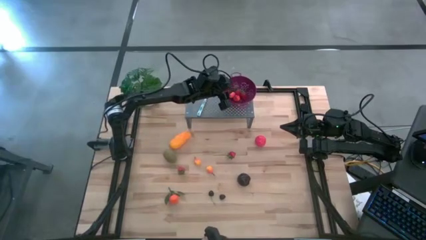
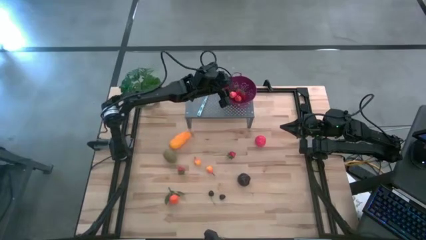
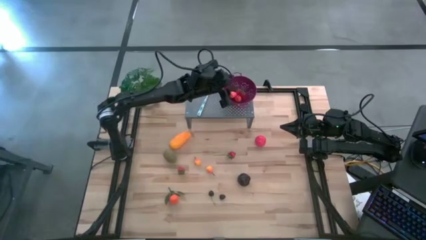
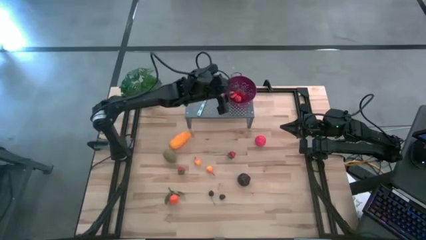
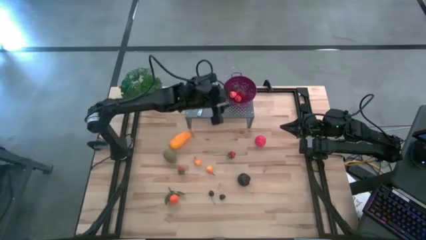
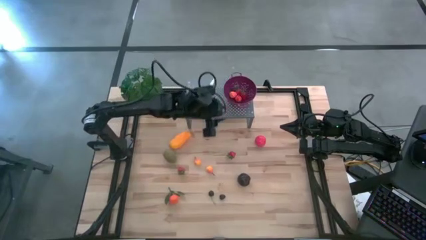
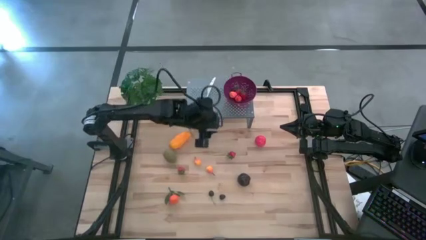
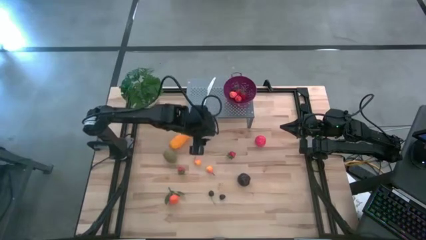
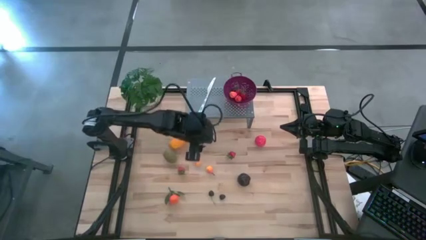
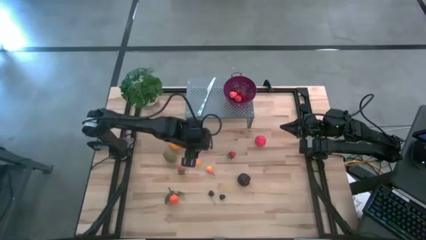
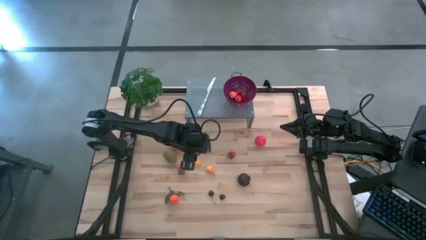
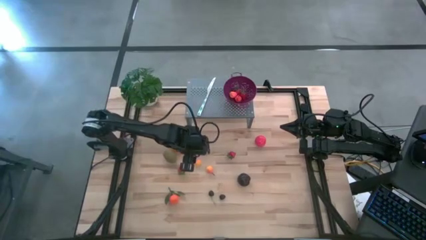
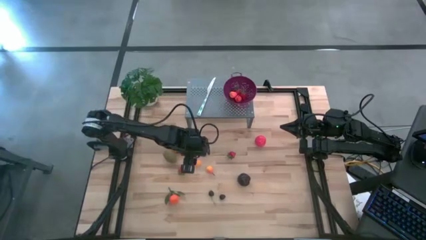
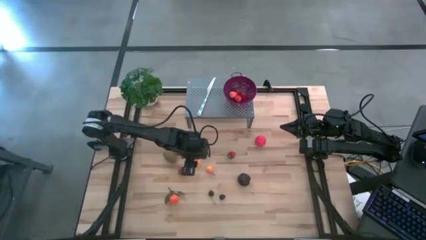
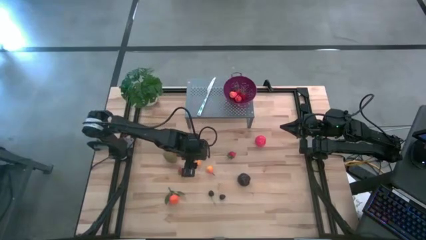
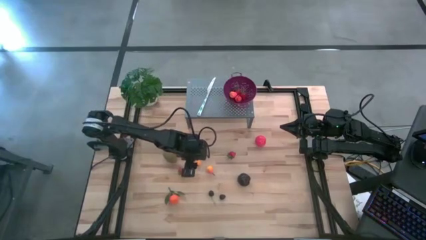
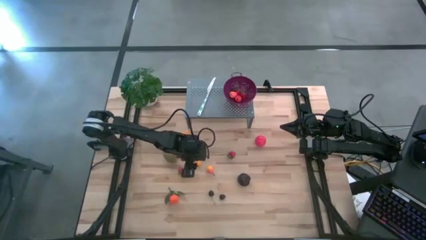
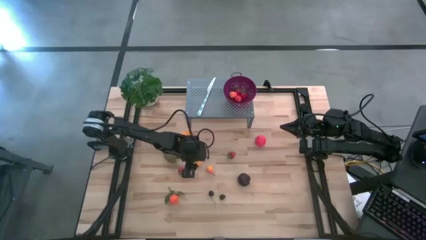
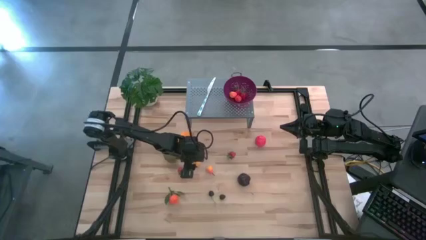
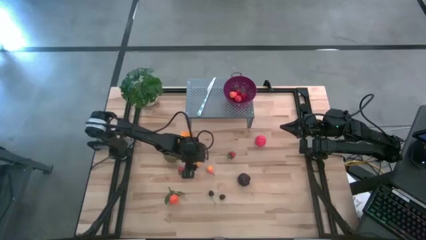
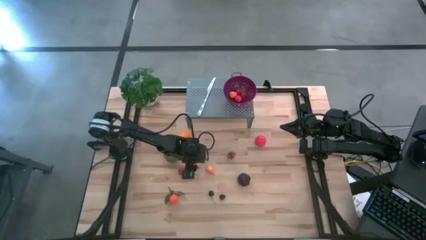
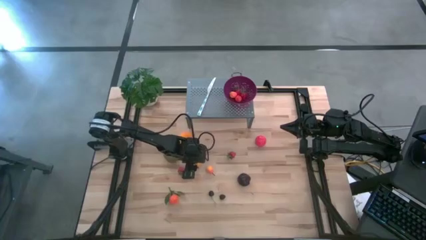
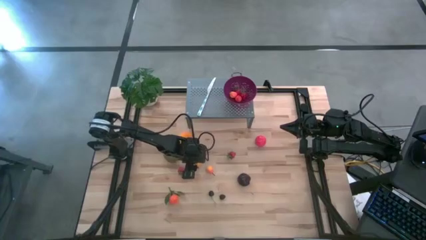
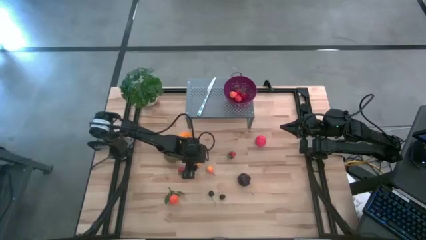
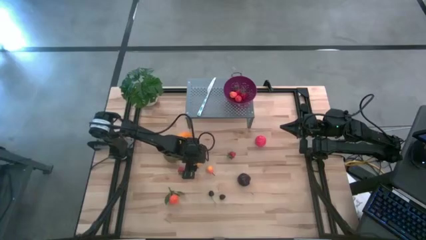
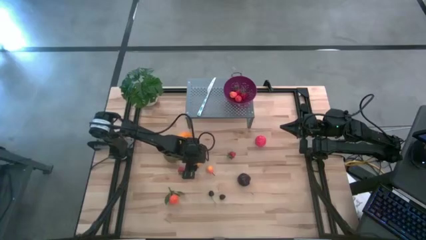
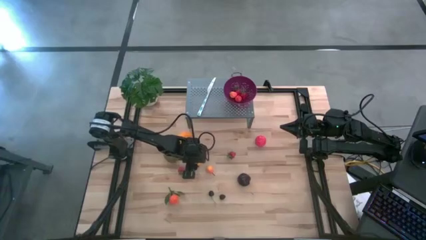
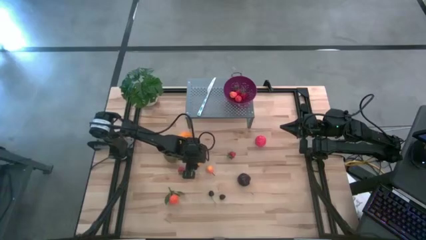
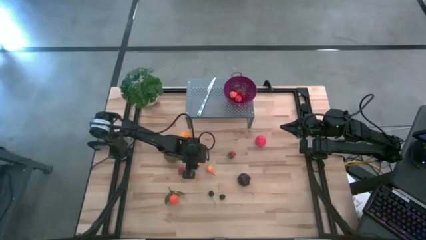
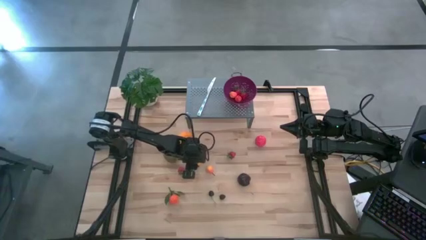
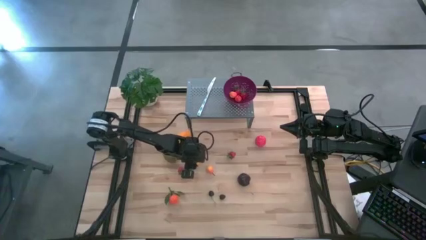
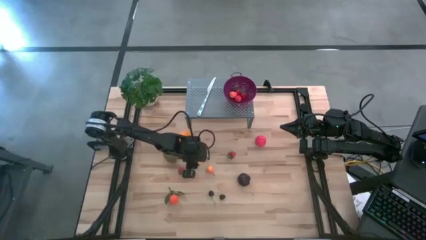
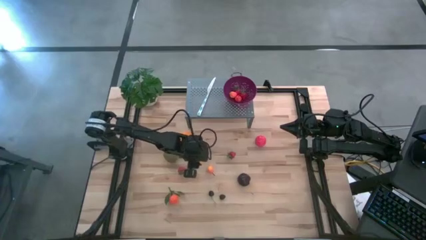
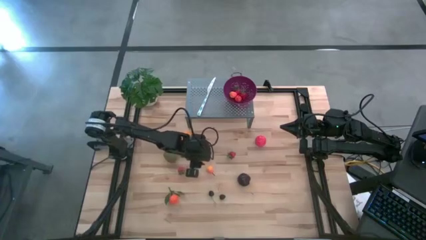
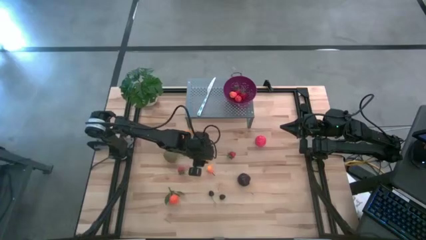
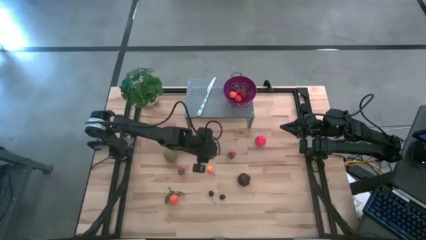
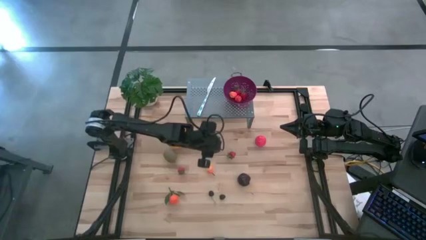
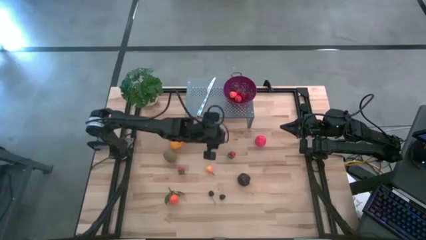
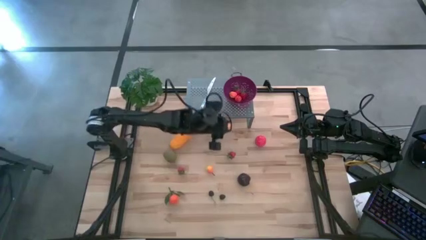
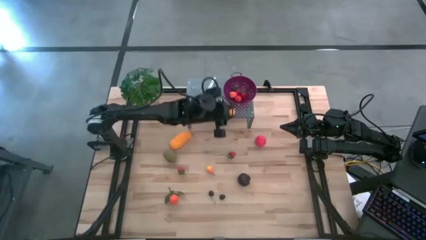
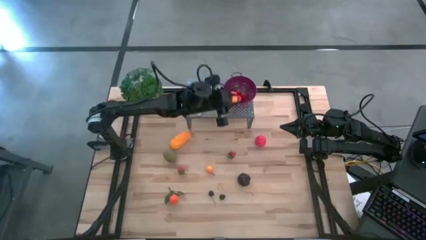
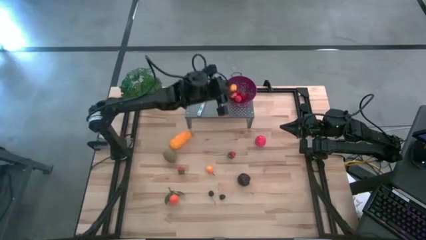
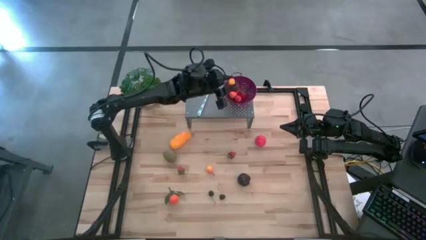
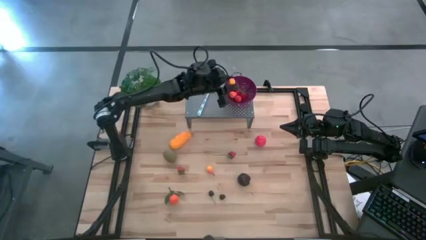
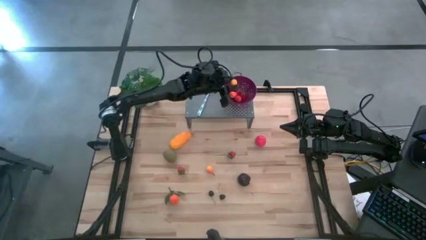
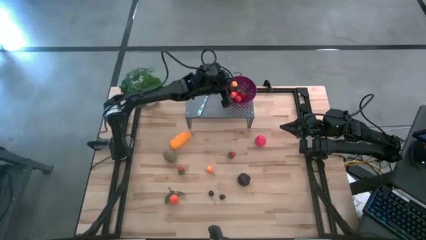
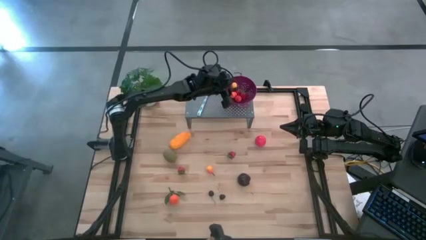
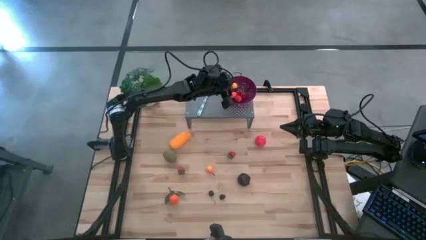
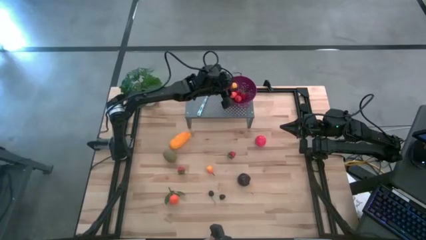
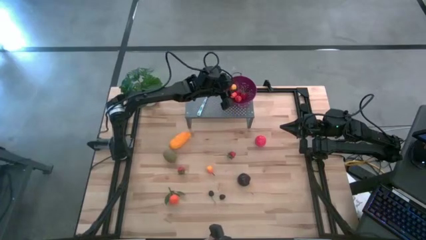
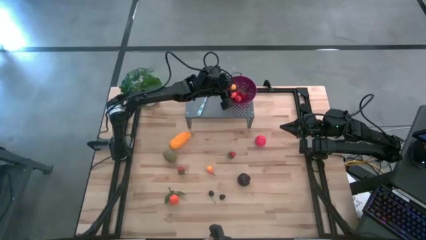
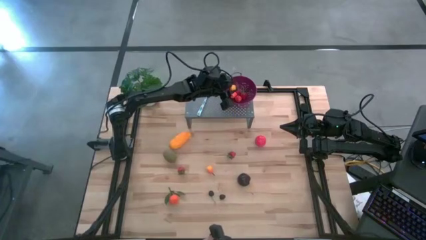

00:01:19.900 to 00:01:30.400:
Task: Pick & Place Fruit
Put the orange pear into the violet strainer bowl on the shelf

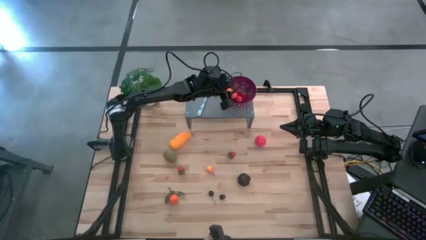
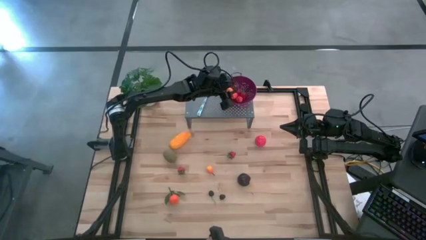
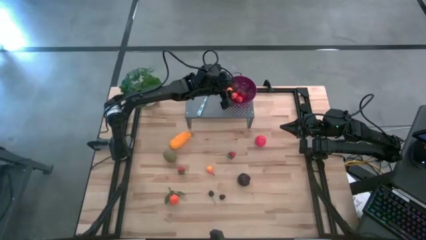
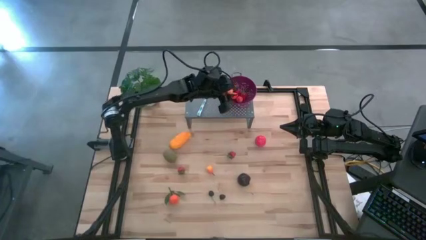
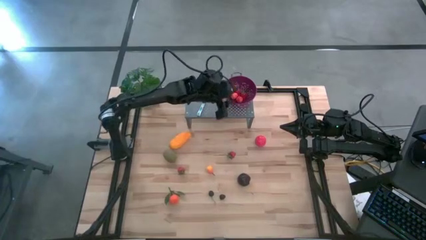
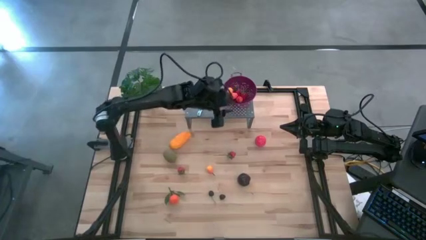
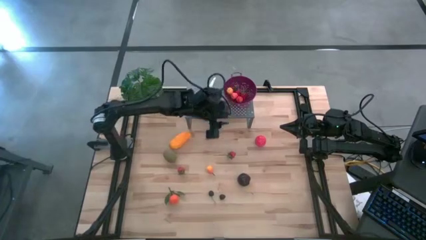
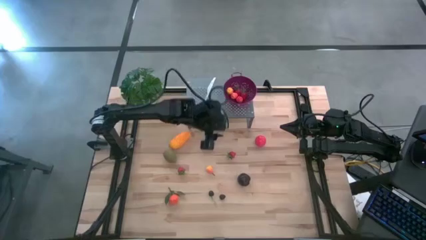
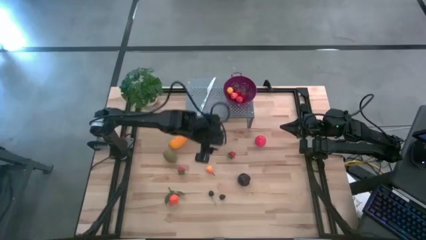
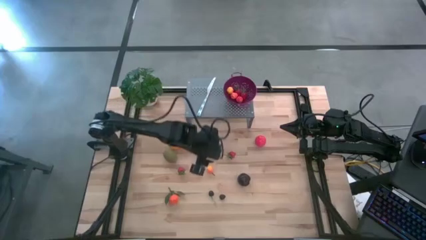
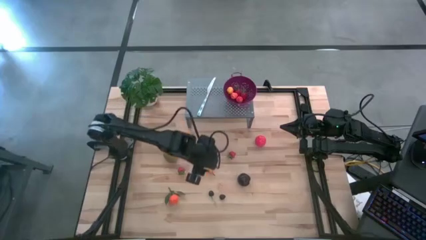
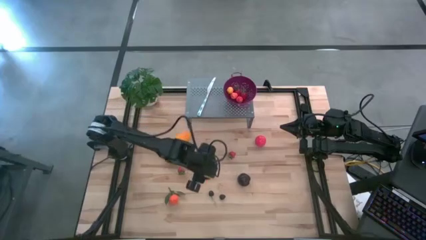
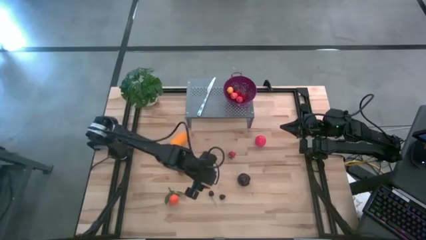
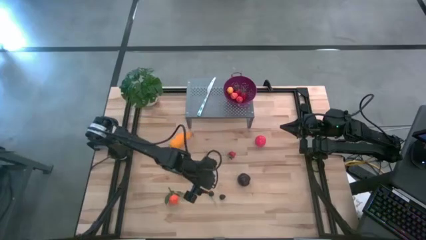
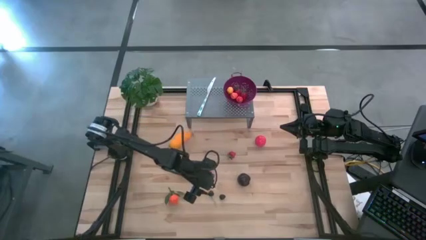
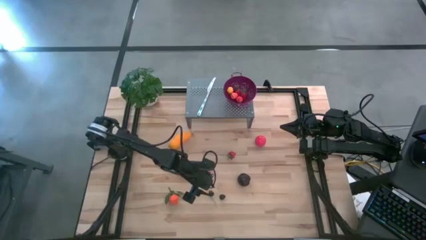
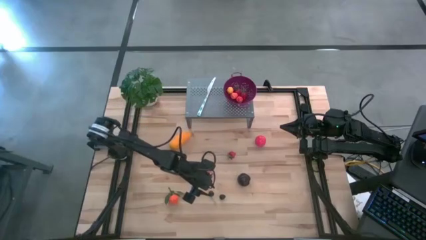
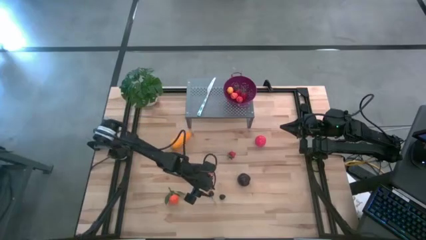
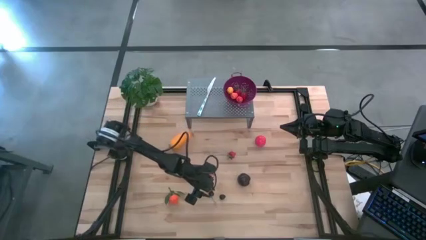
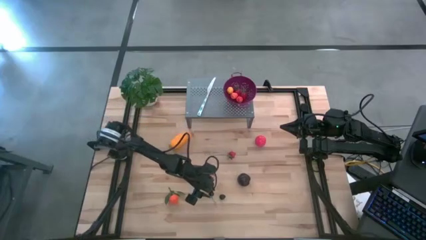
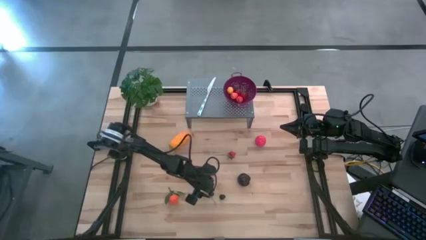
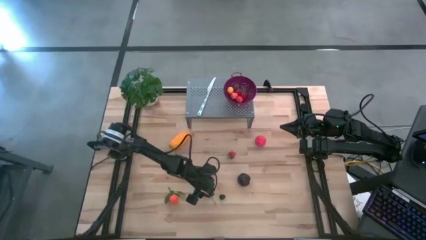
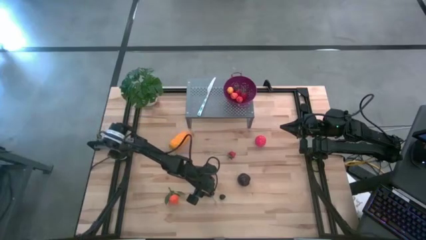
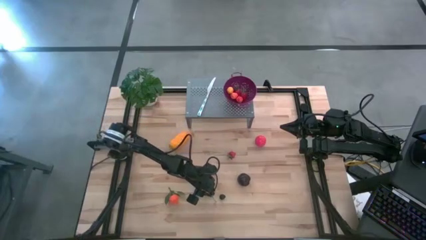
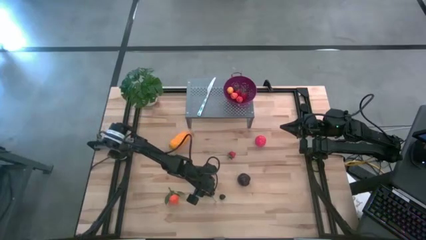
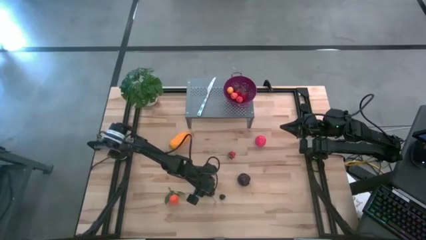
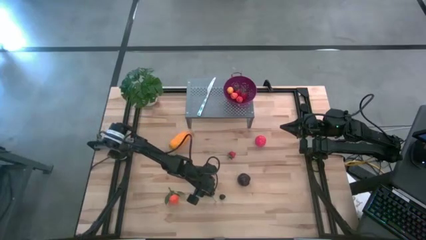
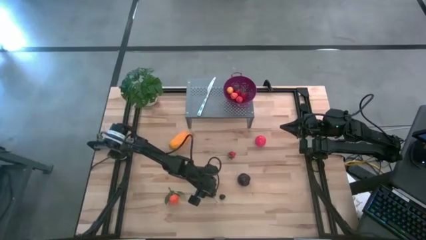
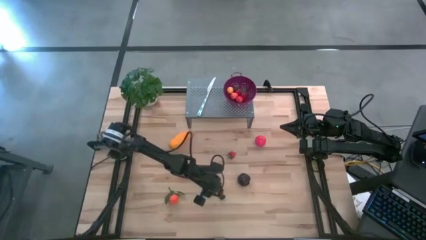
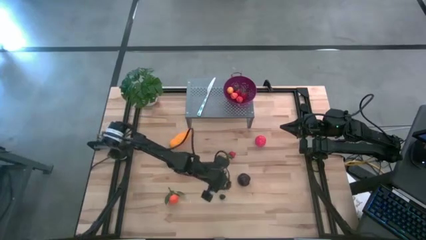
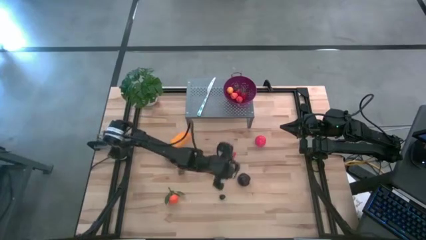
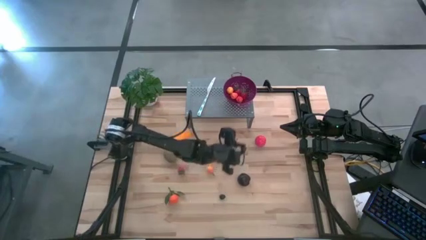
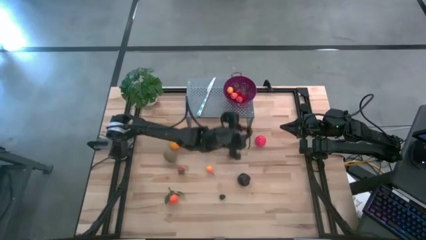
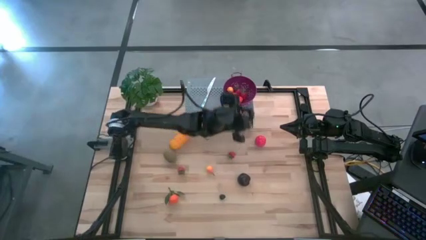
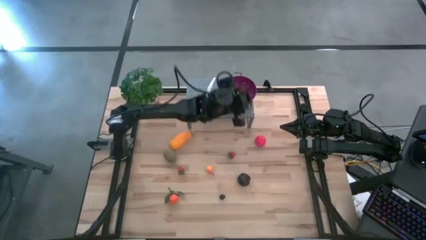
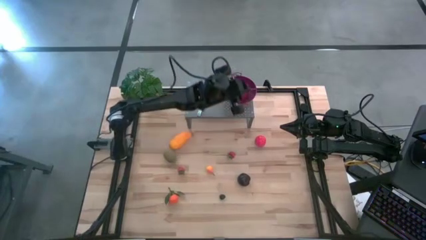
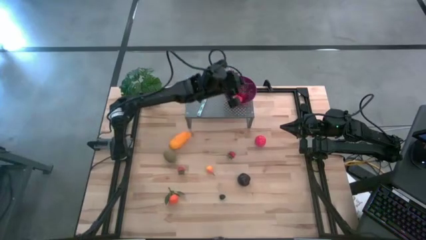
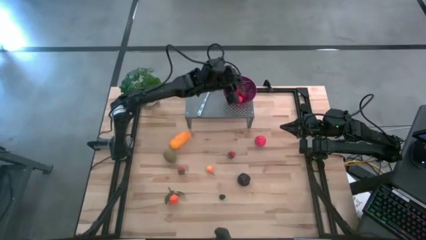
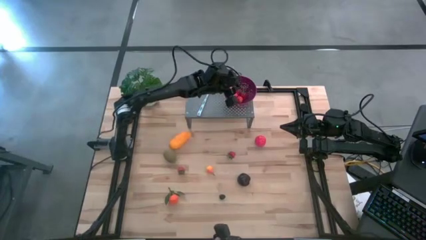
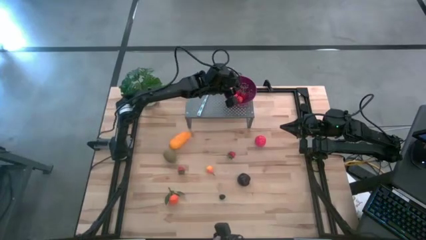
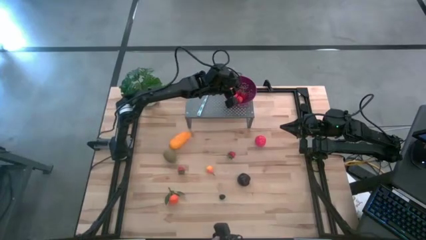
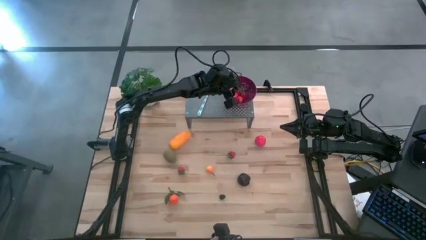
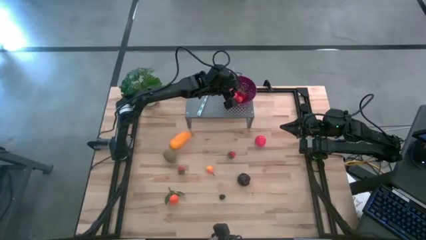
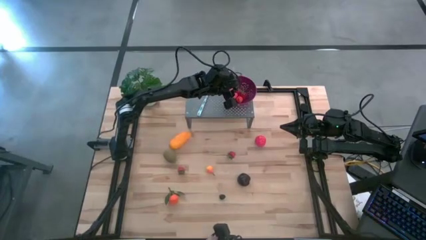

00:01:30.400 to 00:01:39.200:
Put the black cherry into the violet strainer bowl on the shelf
